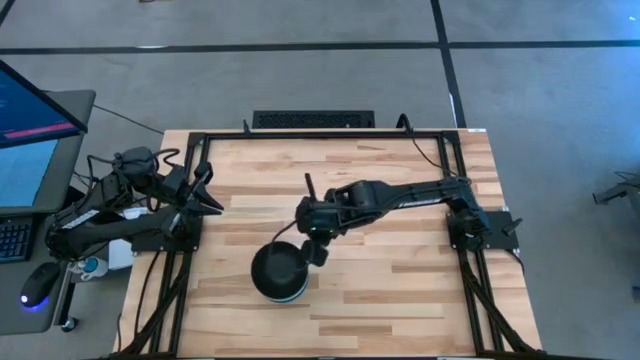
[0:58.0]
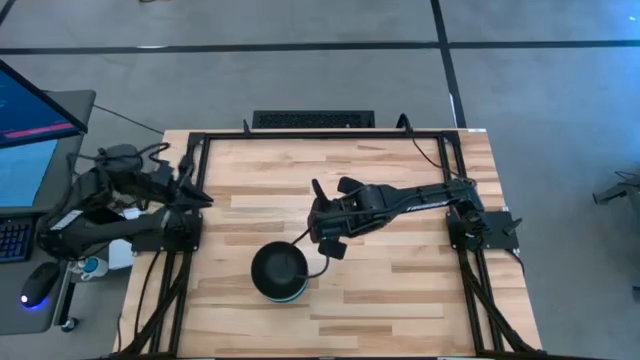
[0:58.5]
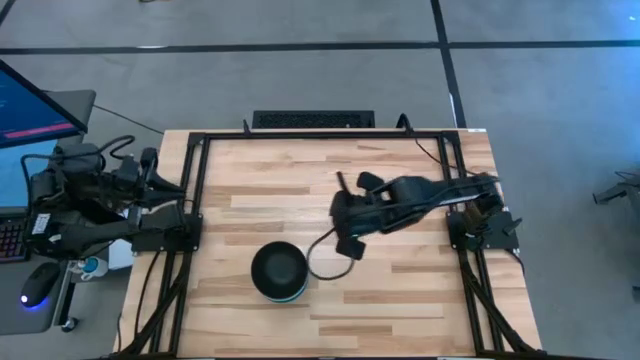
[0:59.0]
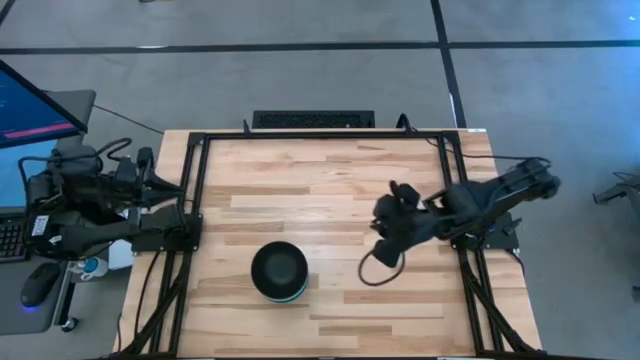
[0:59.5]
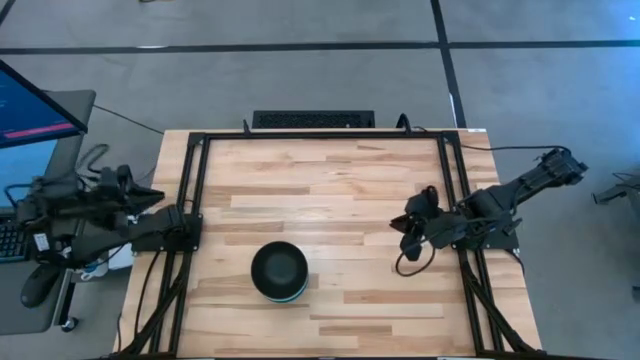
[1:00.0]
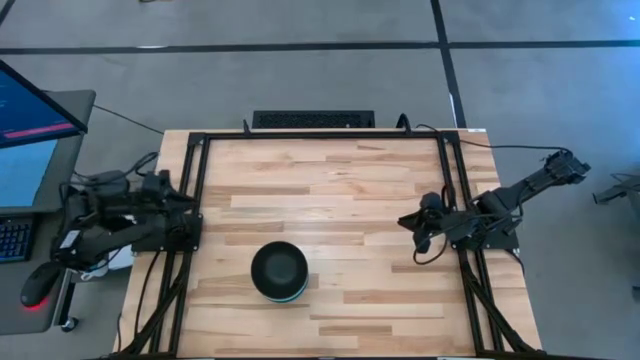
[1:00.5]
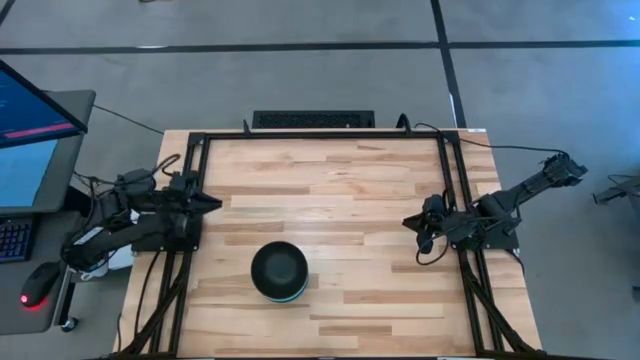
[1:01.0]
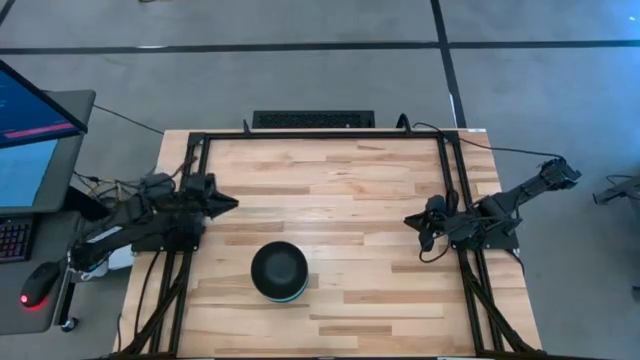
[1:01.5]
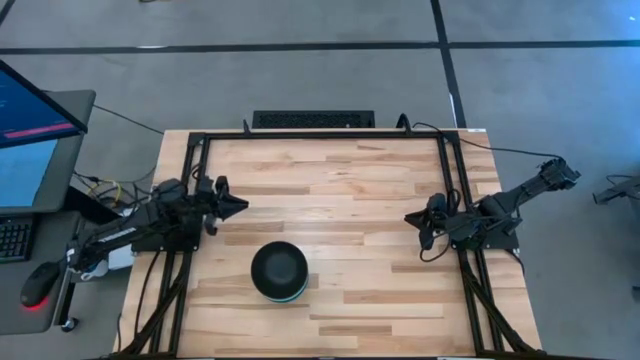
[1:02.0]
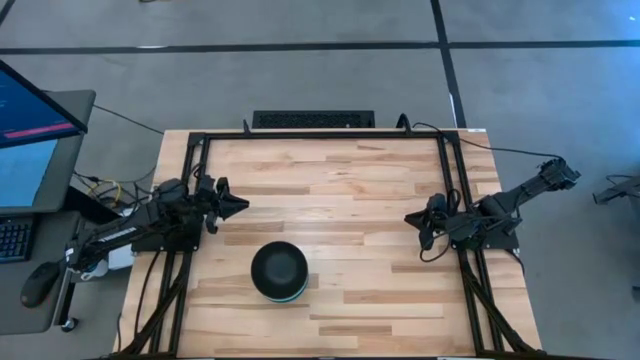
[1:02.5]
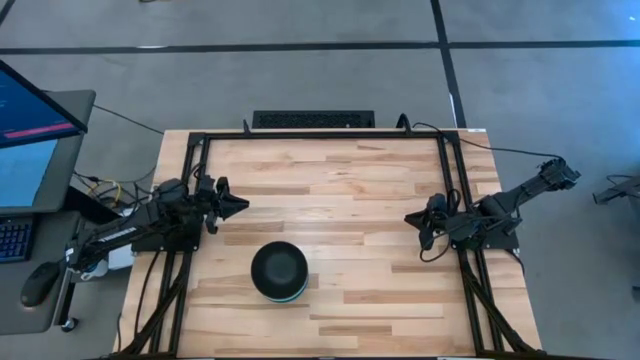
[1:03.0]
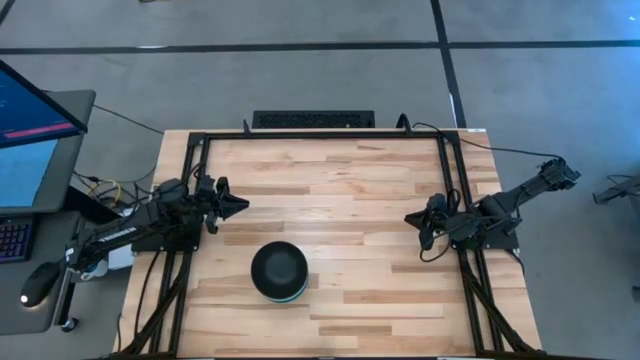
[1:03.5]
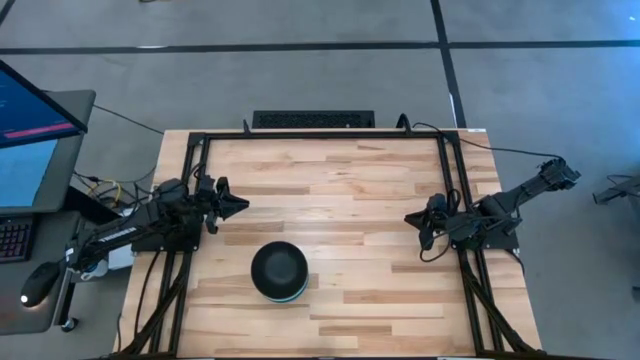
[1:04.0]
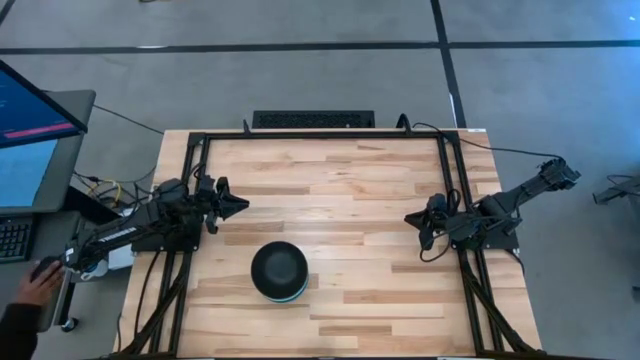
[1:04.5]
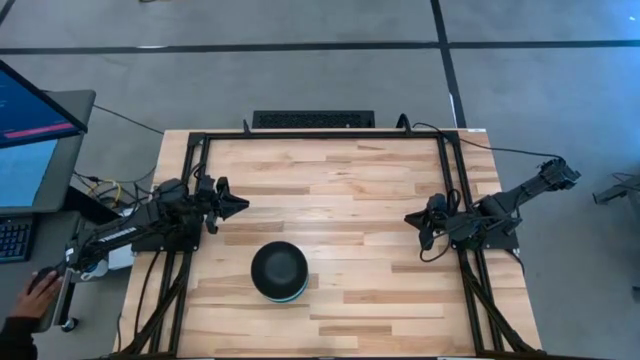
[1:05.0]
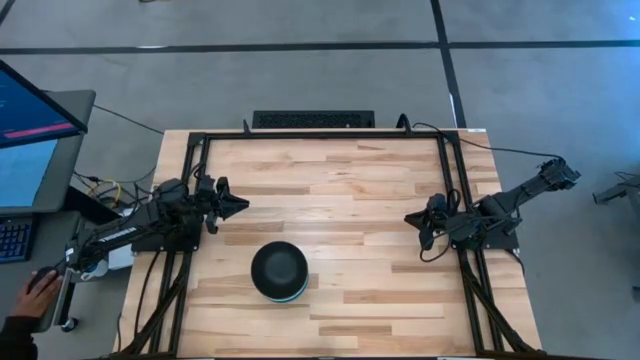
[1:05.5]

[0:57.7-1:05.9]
Task: Nest bowls inside each other
Return to Home Position

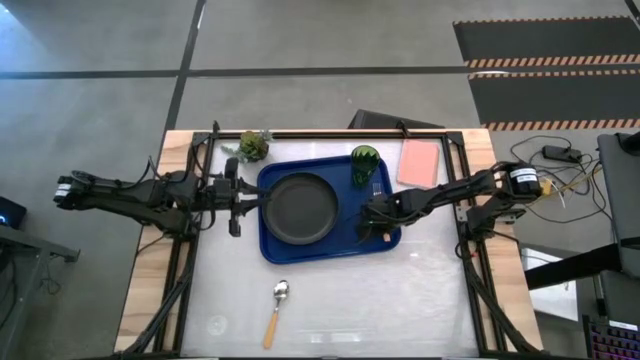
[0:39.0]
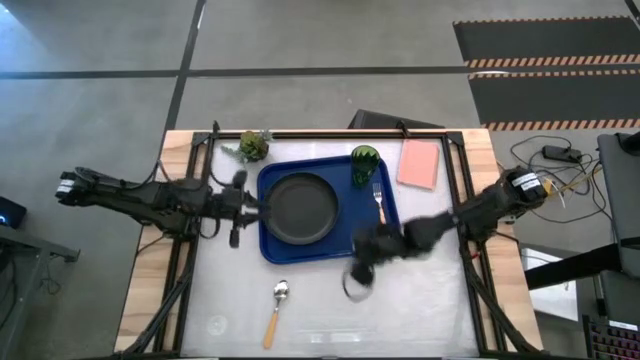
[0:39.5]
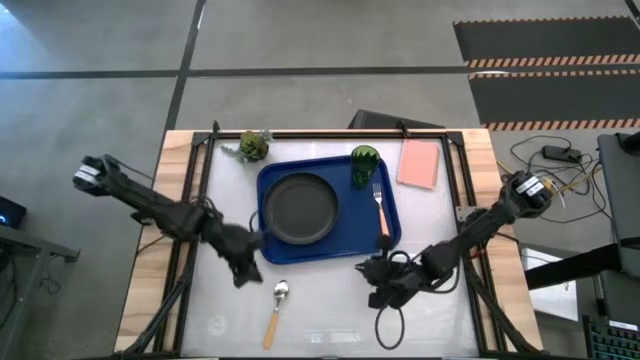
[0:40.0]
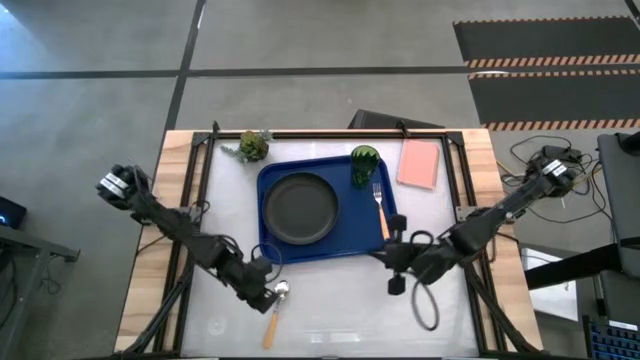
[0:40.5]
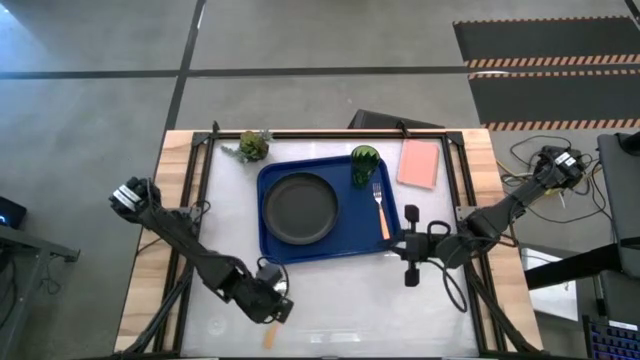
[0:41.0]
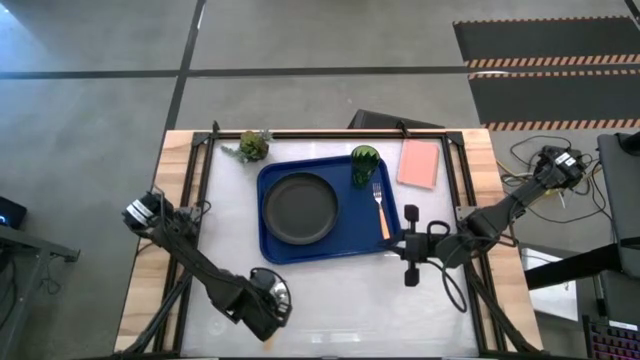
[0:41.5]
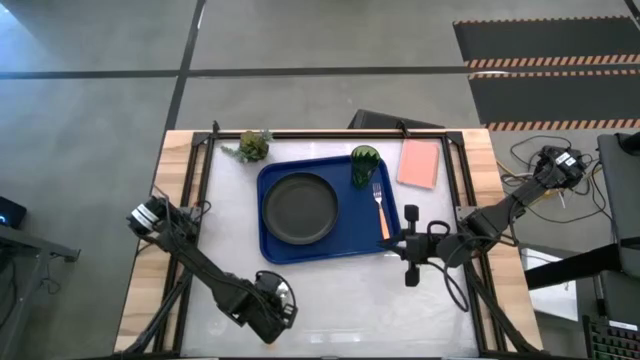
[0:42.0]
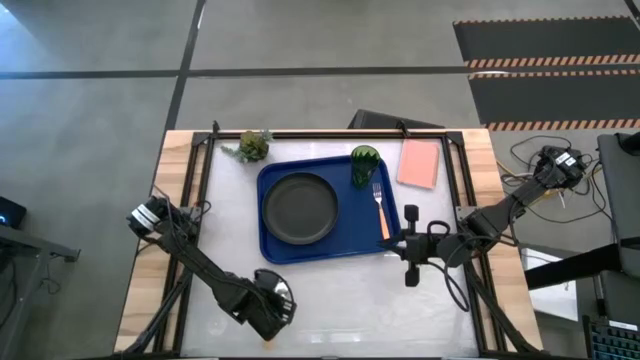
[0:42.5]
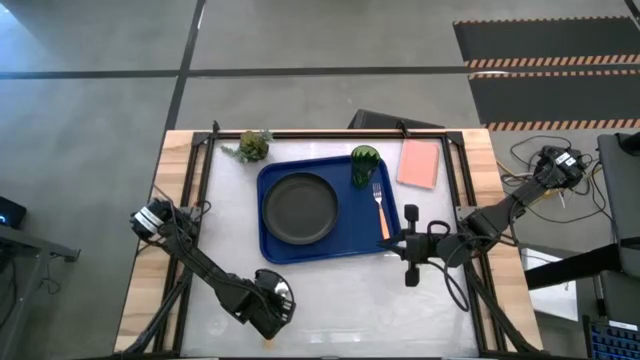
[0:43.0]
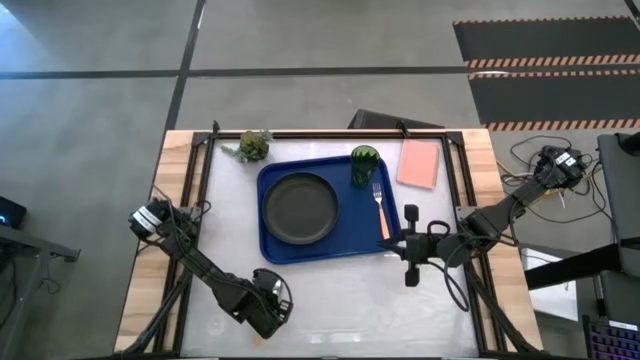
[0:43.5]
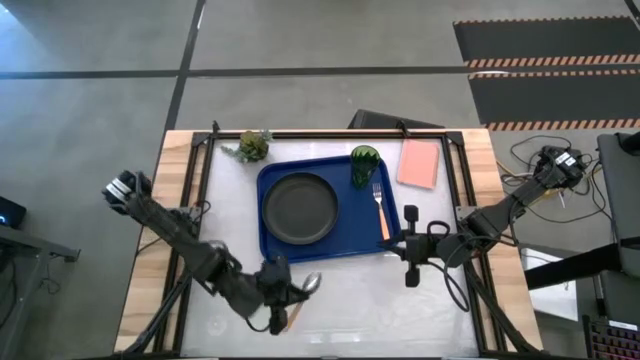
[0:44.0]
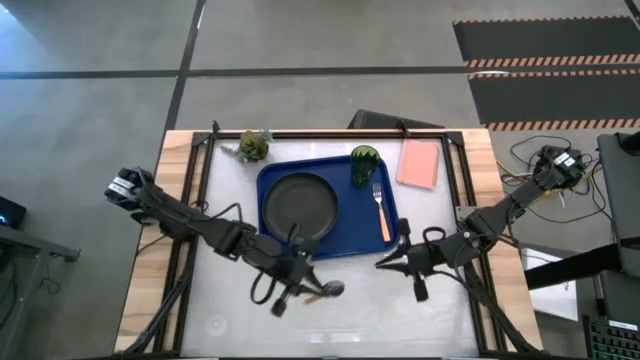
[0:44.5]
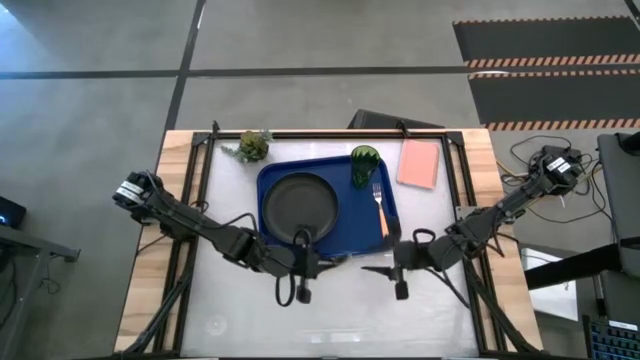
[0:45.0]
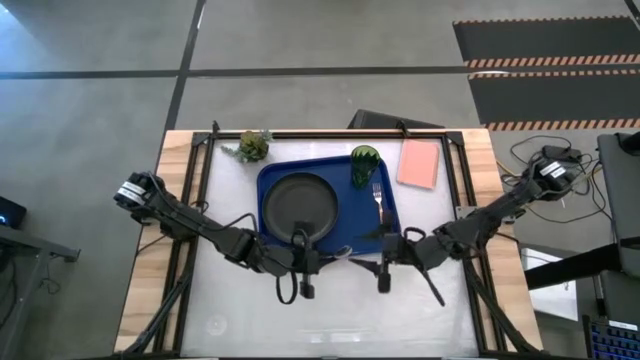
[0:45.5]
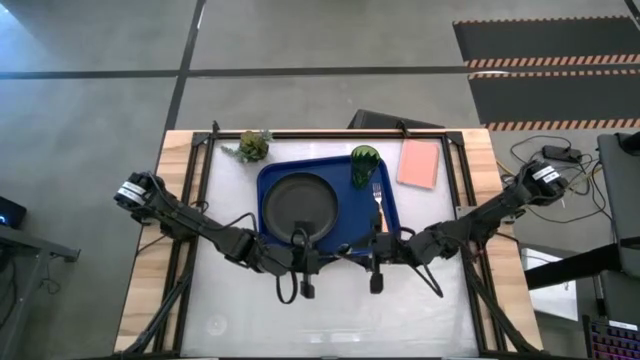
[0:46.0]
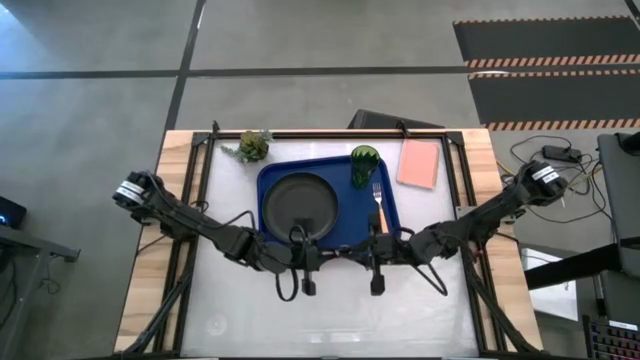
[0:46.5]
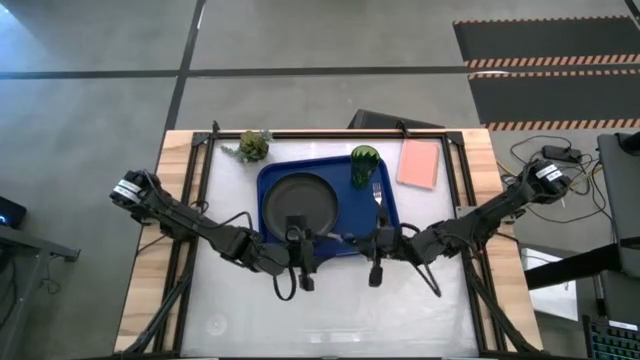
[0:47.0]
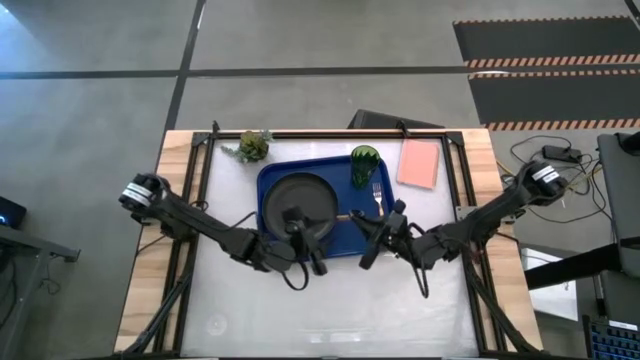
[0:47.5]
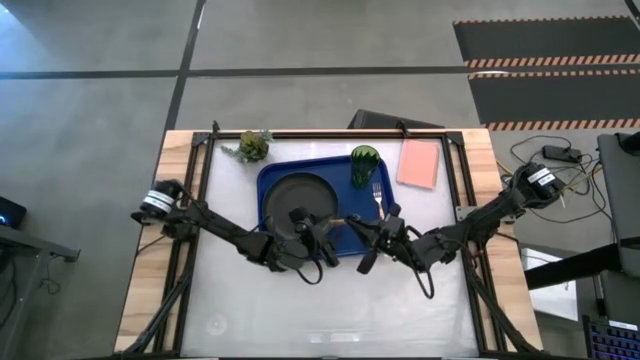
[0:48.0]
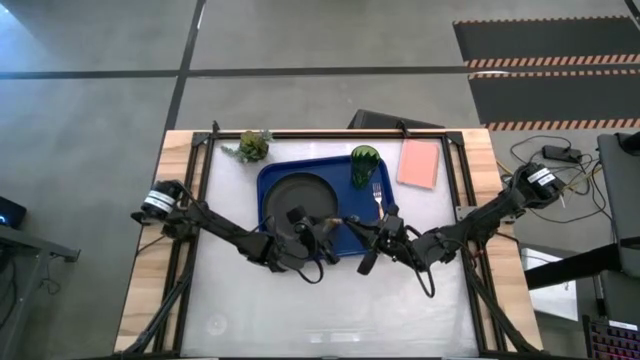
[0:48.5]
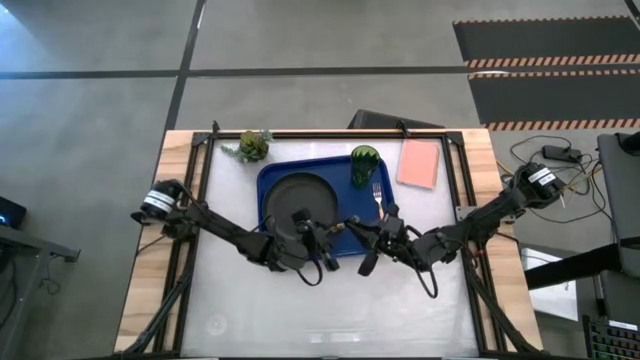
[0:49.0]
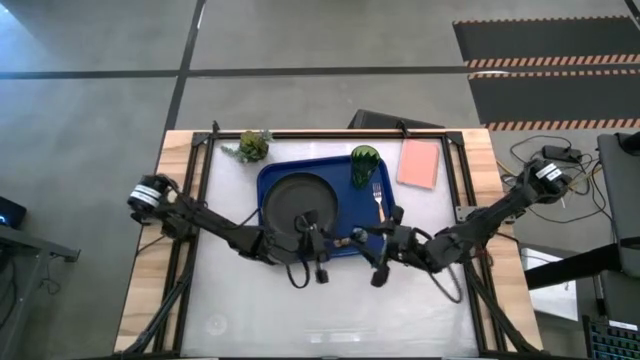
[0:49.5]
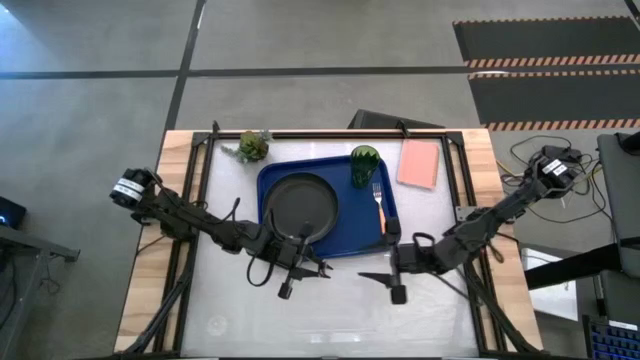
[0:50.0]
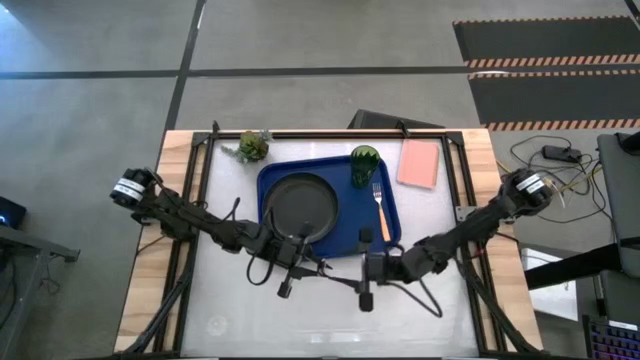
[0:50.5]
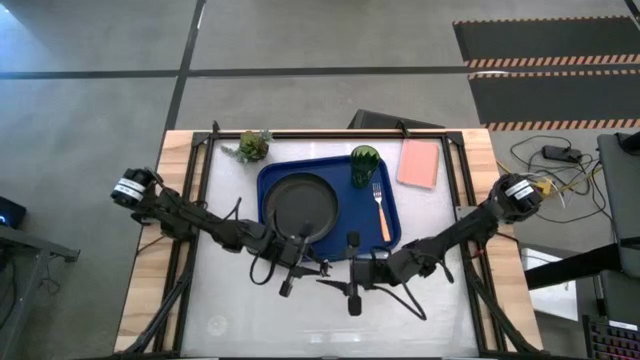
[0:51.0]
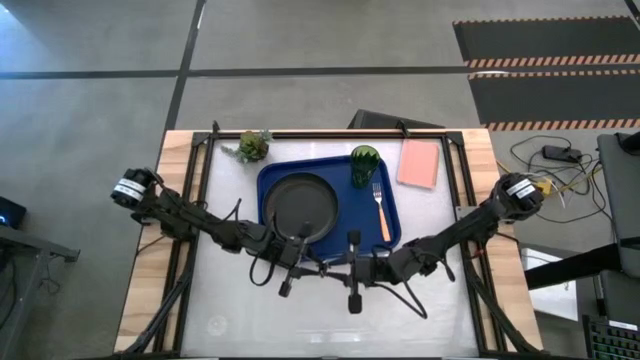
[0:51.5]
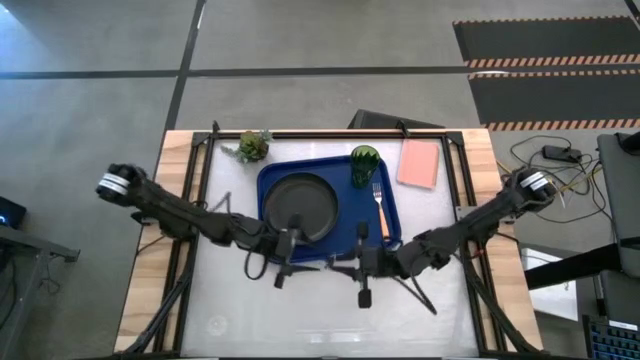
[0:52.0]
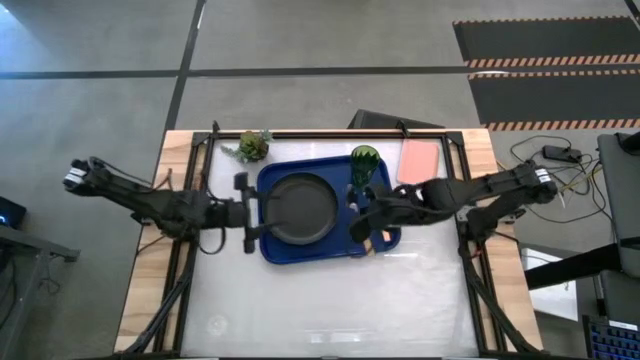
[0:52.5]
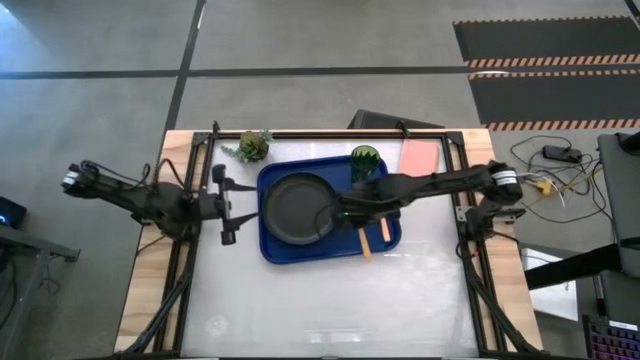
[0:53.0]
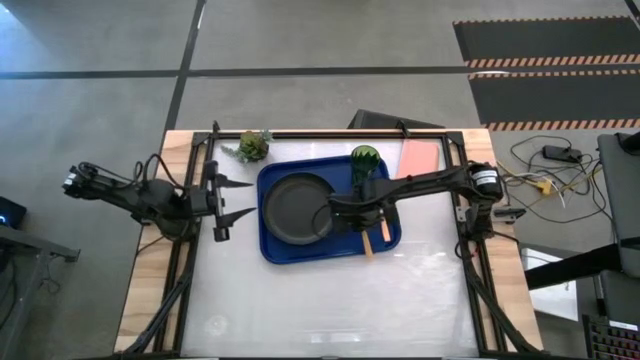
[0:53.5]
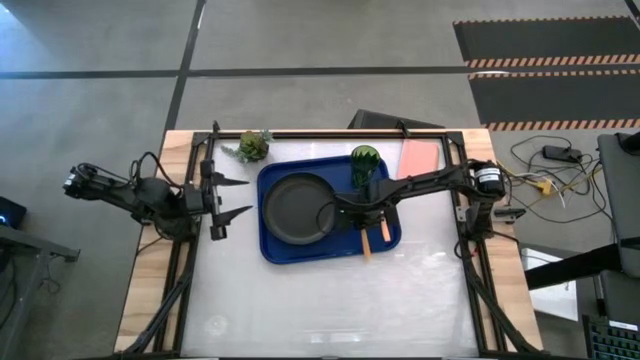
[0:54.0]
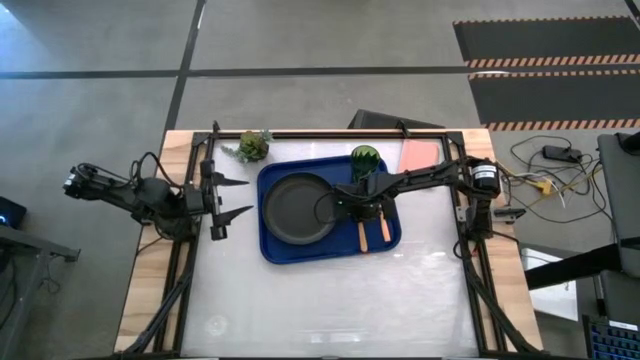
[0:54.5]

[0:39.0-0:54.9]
Task: Pick and place plate/cup/fork/spoon on tray
Put the orange spoon on the blue tray between the black plate and the orange fork
